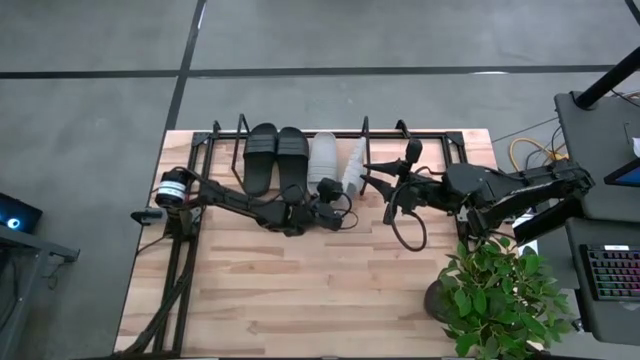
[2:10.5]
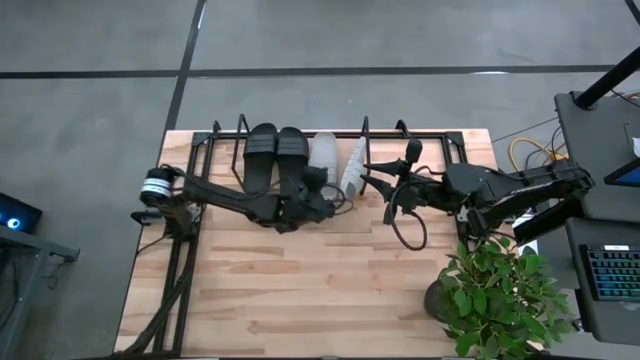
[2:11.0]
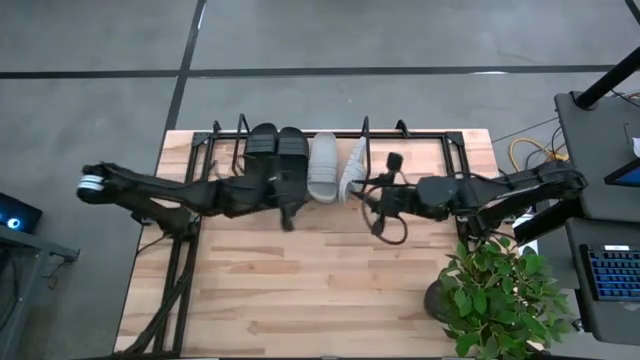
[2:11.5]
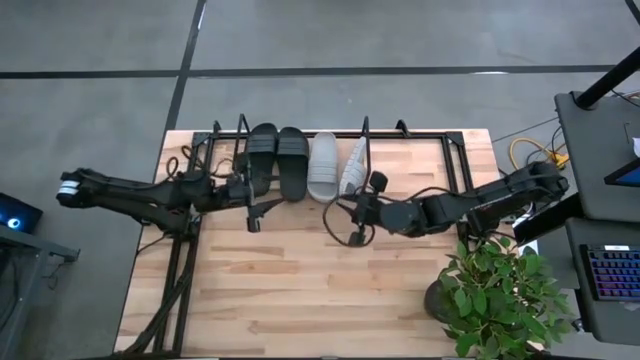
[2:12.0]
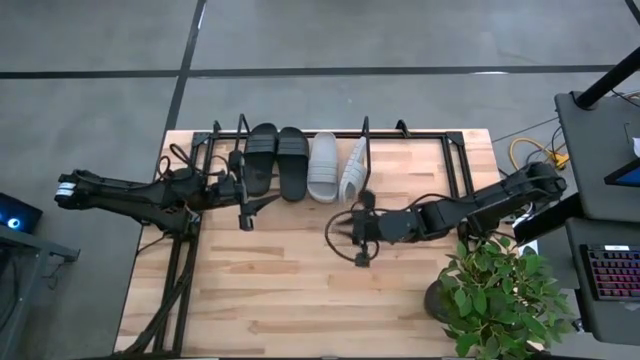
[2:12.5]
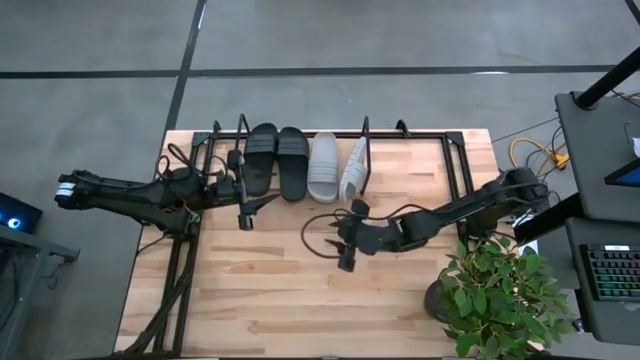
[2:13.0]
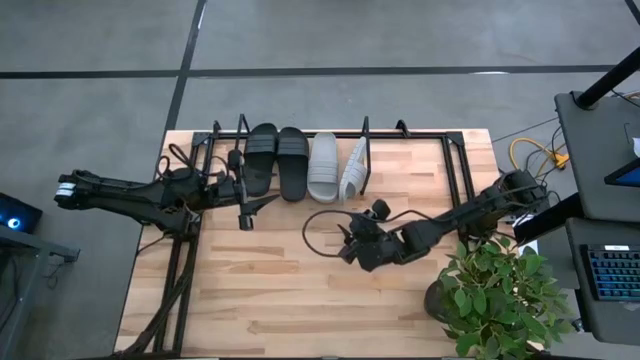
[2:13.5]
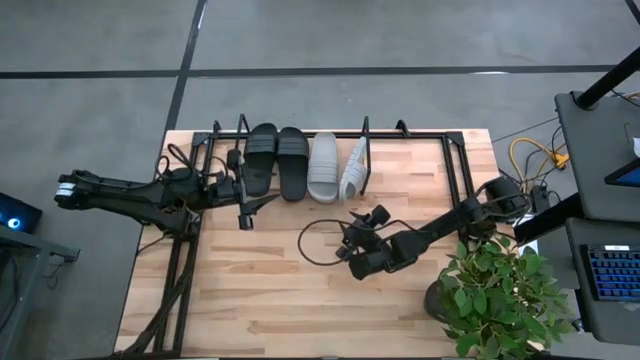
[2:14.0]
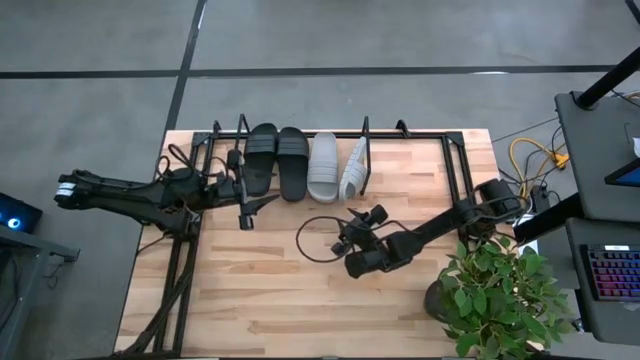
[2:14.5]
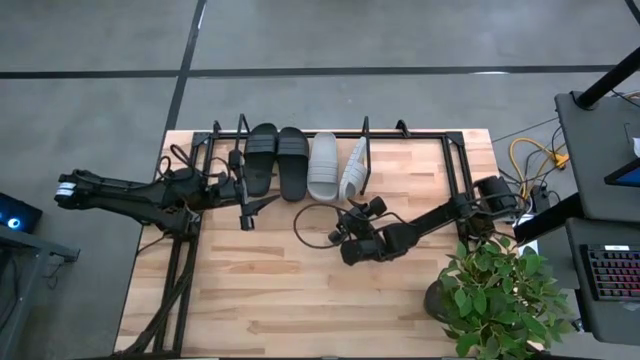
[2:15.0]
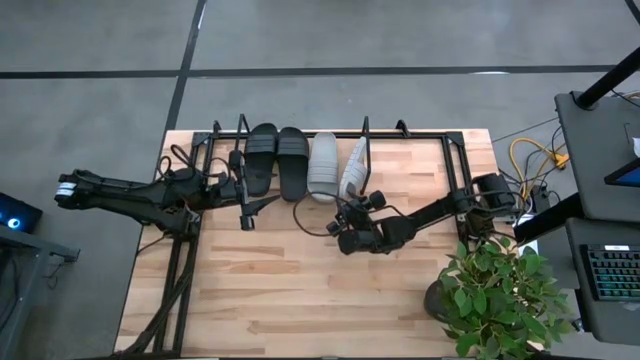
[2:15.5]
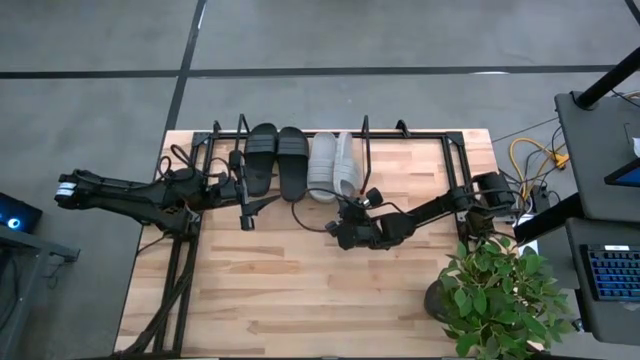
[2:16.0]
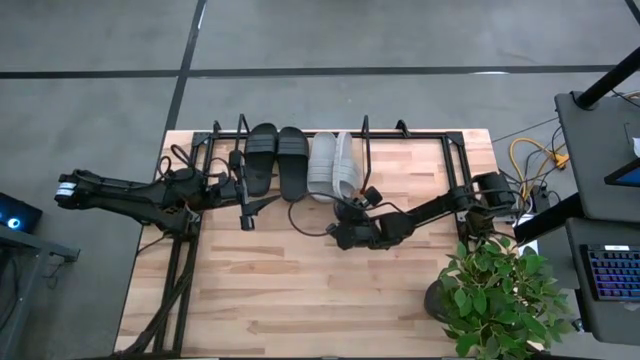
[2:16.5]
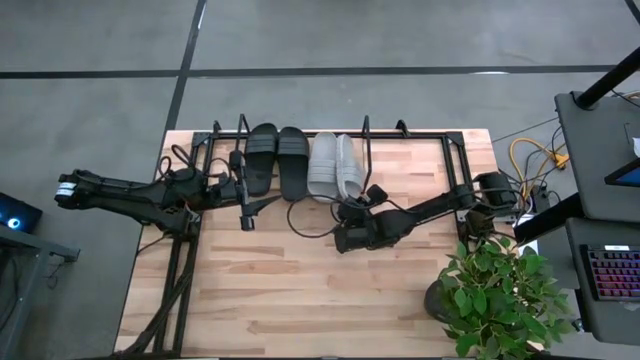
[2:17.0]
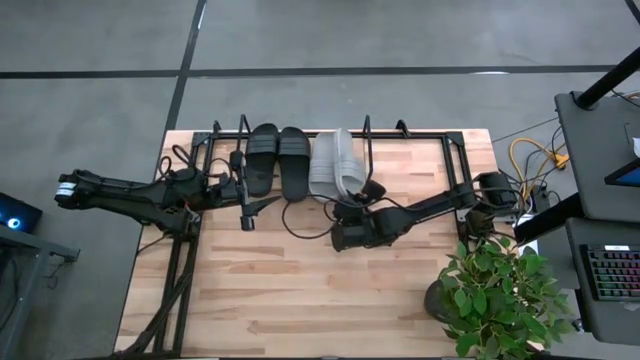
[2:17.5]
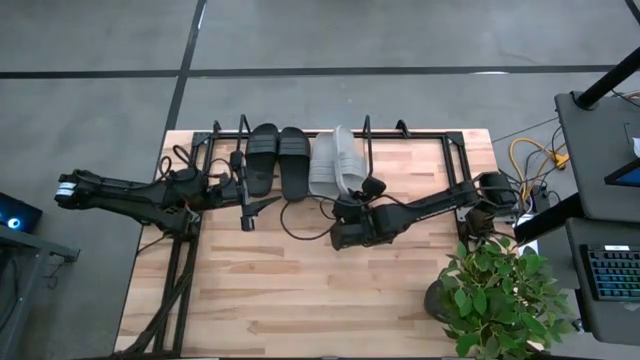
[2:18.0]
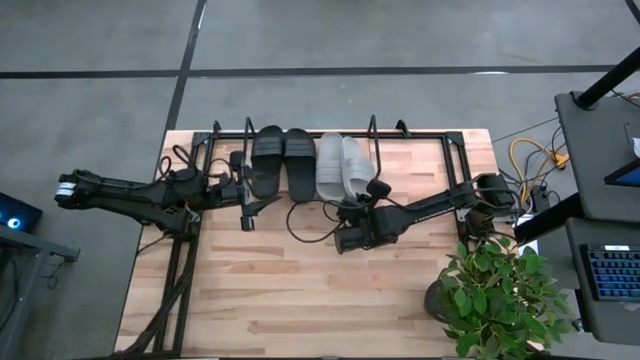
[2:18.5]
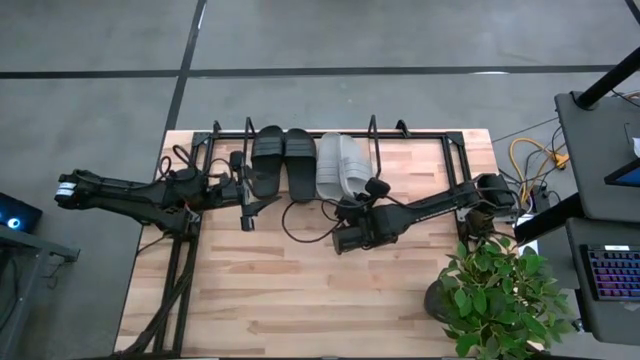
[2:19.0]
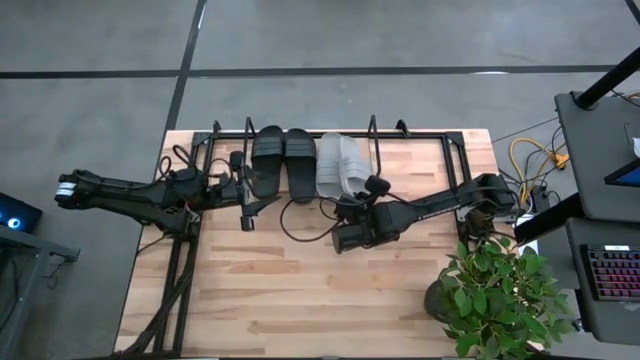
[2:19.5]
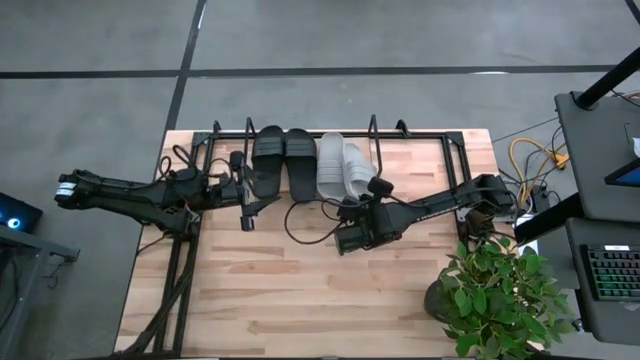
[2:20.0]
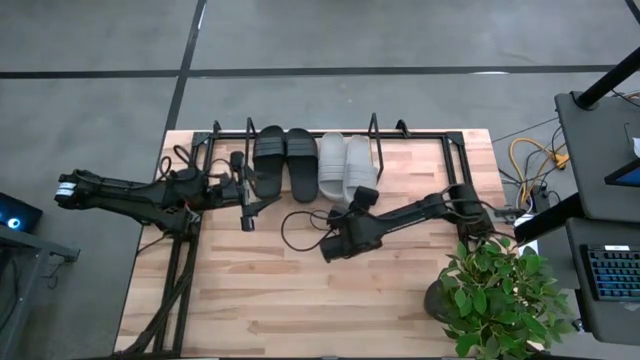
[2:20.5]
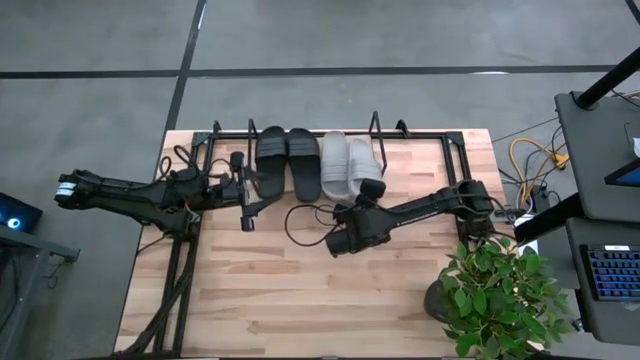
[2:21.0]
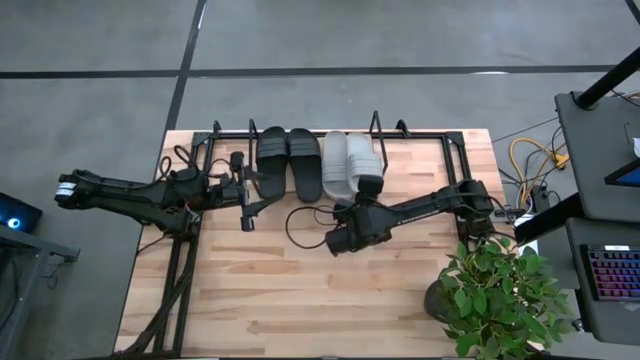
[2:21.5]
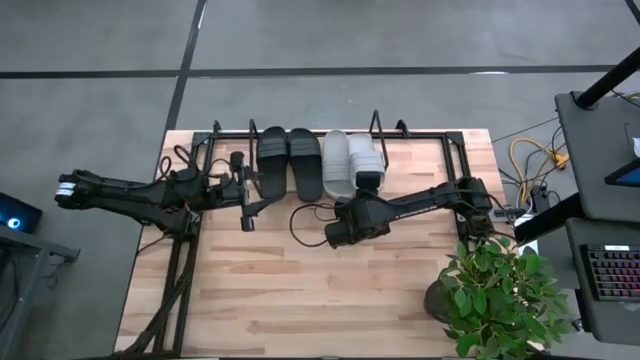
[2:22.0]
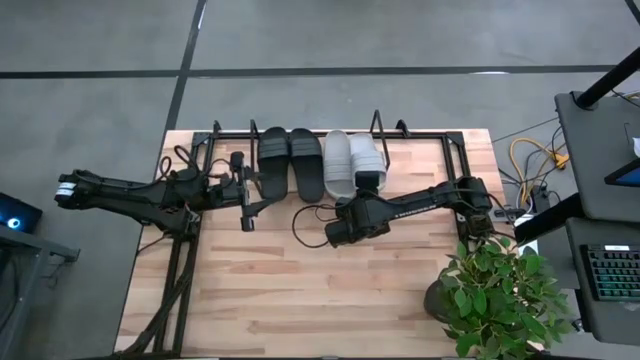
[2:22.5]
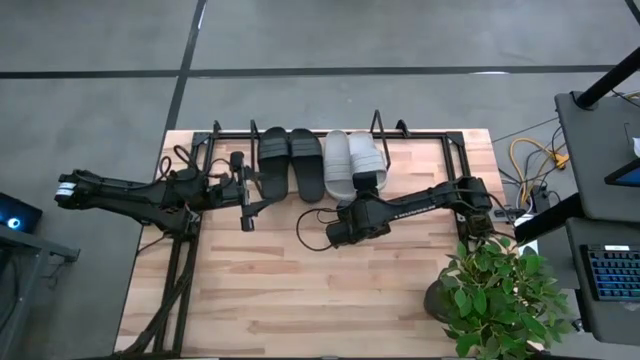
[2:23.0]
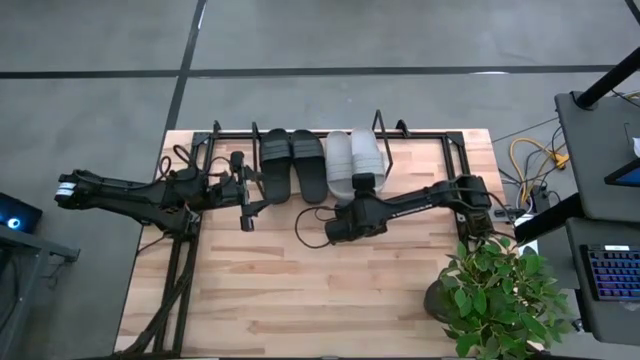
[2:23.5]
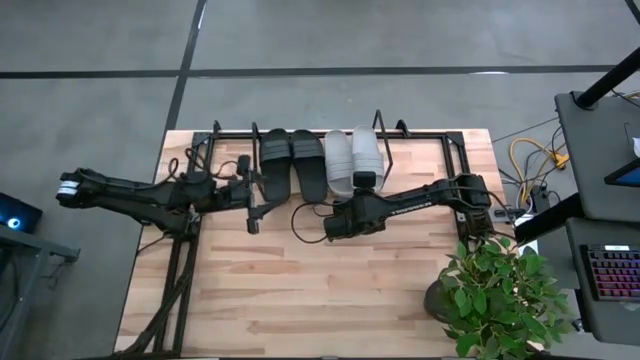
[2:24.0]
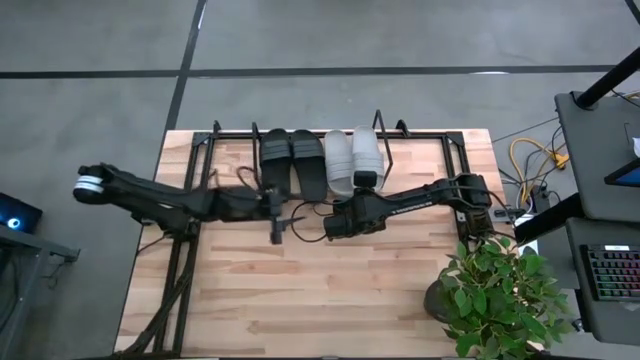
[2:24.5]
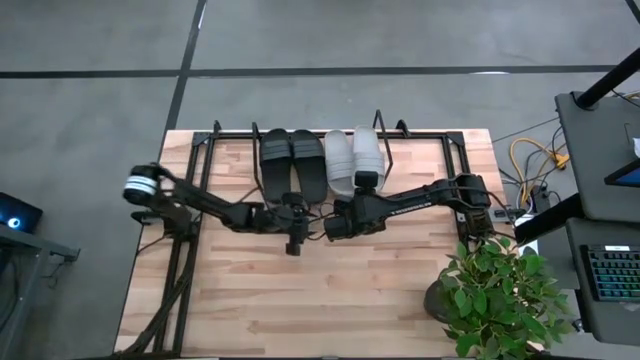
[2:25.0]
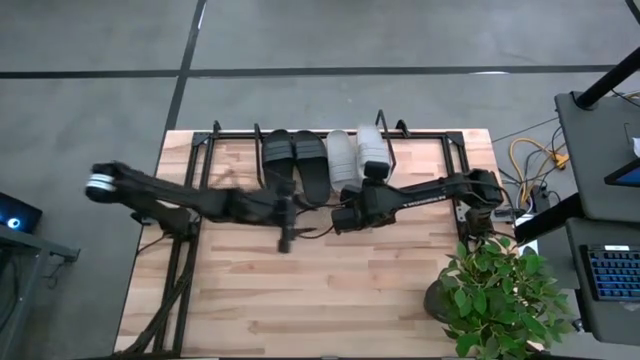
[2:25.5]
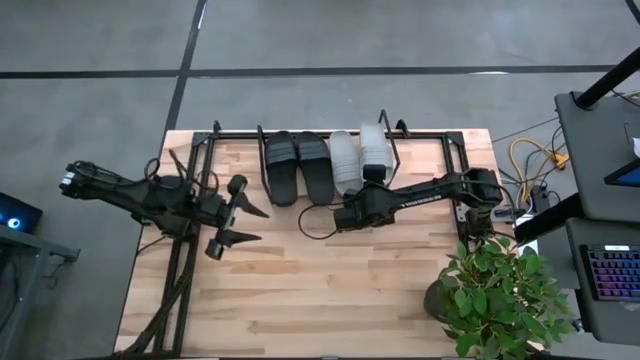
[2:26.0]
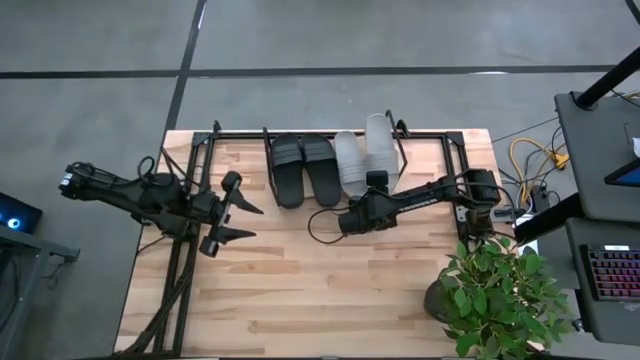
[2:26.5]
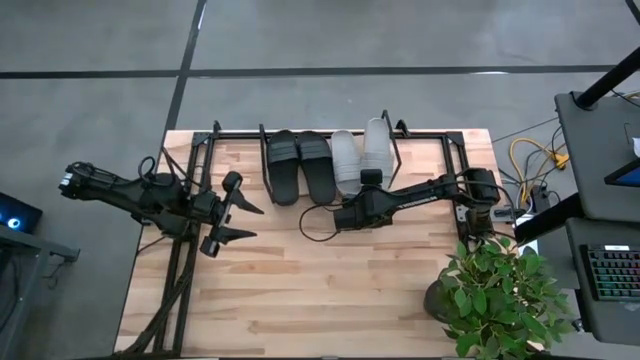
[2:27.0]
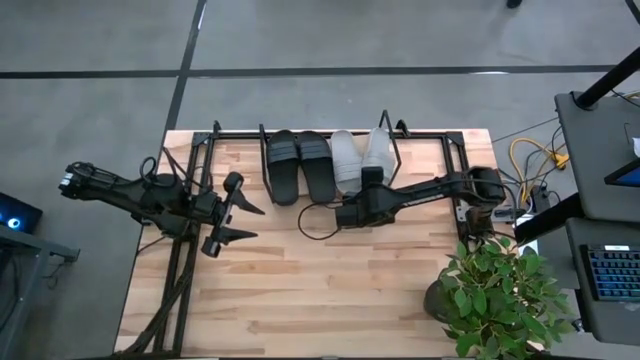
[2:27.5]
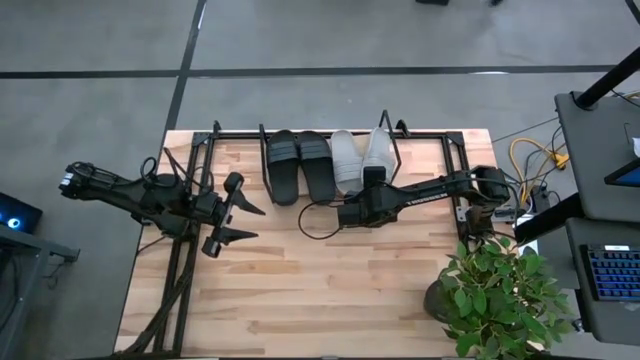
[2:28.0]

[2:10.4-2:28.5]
Task: Pick and place slides into the shelf
Adjust the right gray slide from the shelf

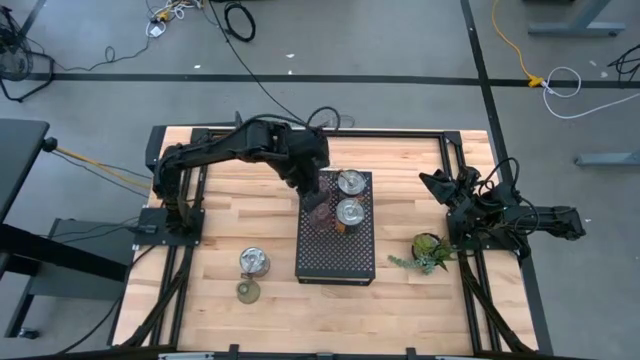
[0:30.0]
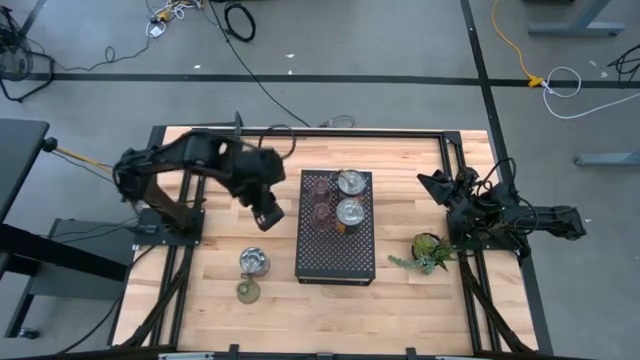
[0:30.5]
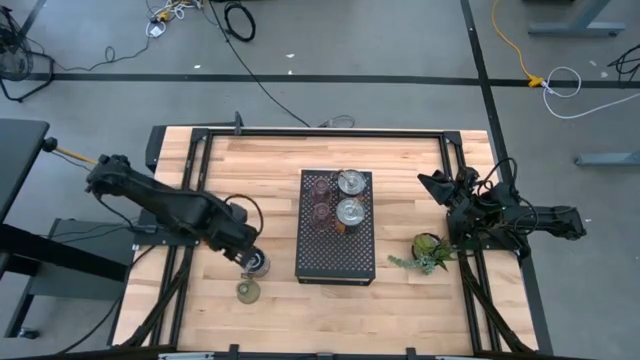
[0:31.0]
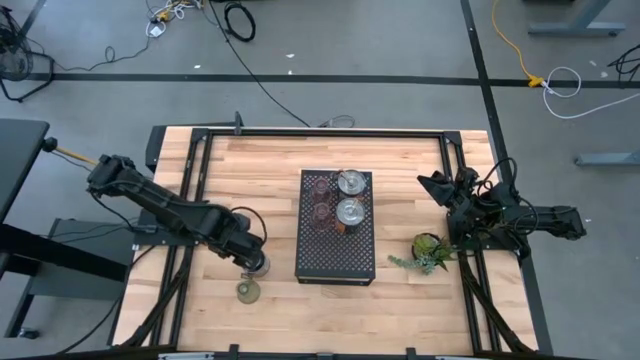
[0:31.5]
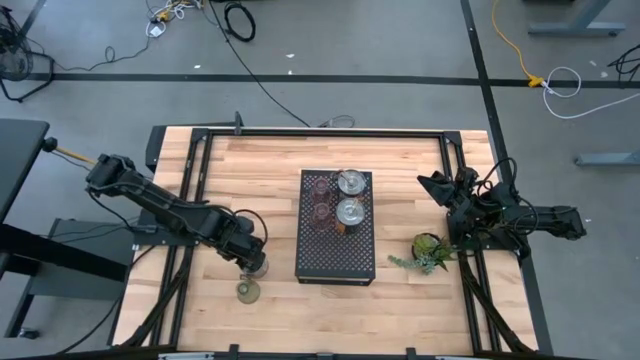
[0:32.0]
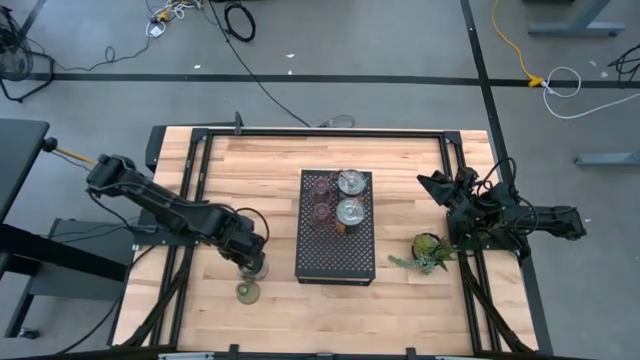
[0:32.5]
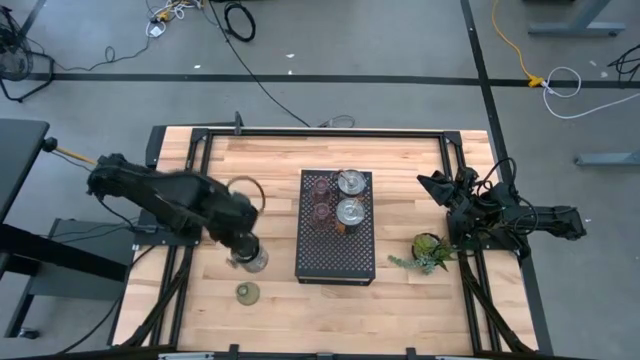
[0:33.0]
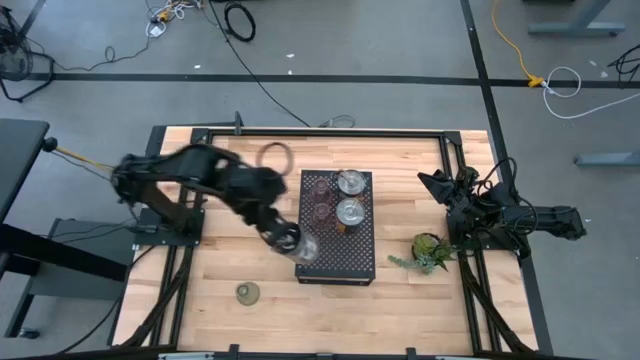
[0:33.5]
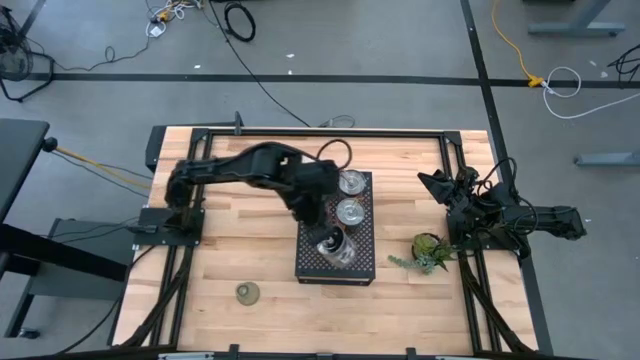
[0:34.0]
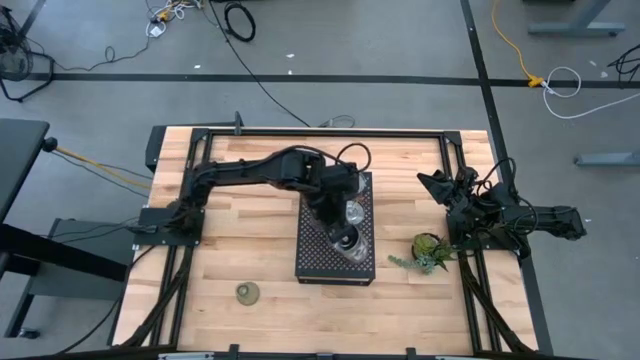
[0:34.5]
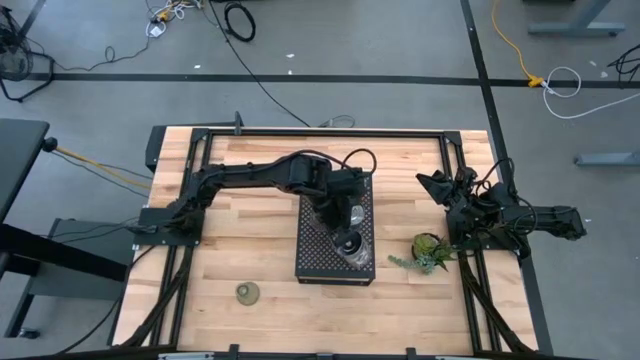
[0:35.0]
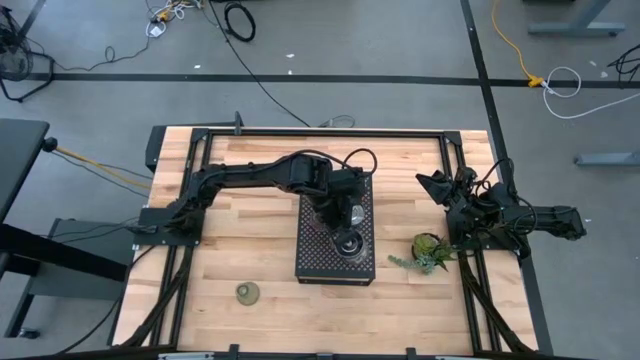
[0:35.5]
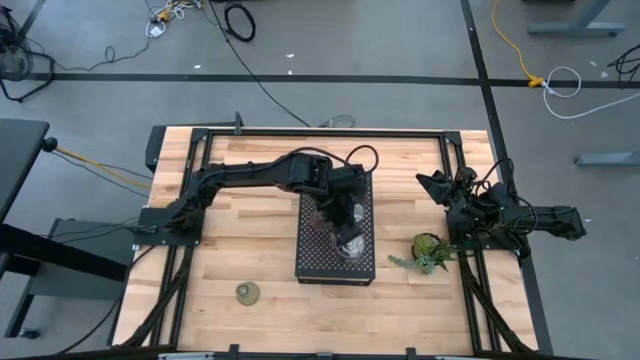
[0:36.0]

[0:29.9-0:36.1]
Task: Pick & Place candle stick holders
Put the silver scented candle on the shelf
